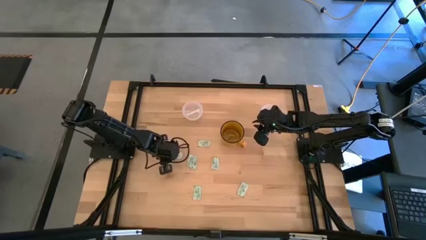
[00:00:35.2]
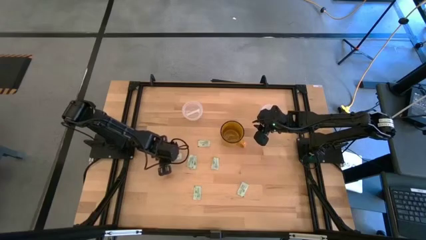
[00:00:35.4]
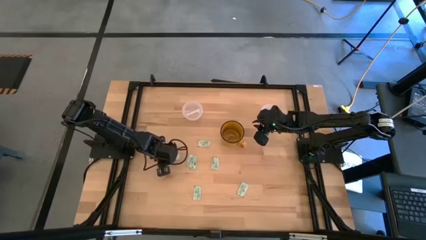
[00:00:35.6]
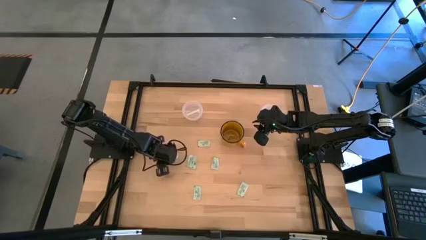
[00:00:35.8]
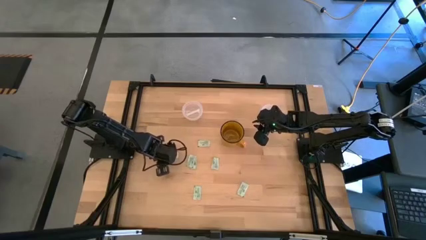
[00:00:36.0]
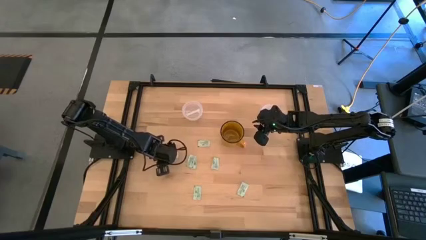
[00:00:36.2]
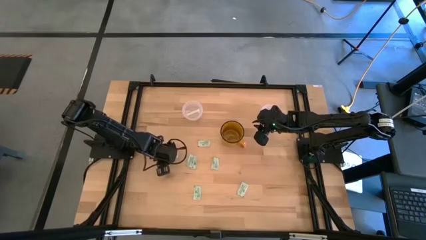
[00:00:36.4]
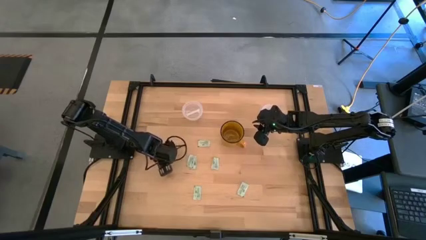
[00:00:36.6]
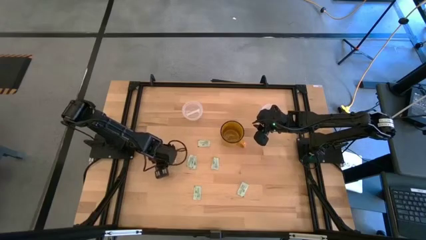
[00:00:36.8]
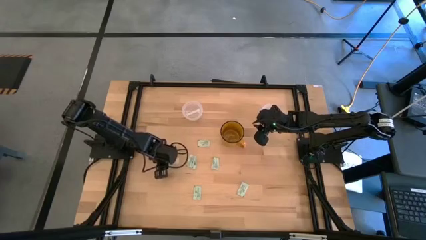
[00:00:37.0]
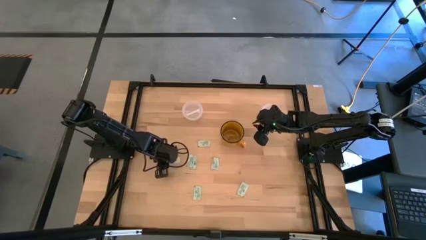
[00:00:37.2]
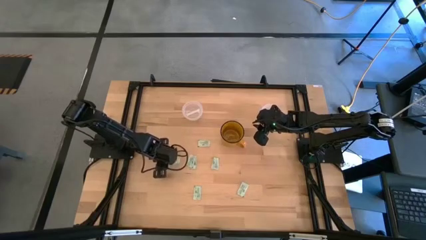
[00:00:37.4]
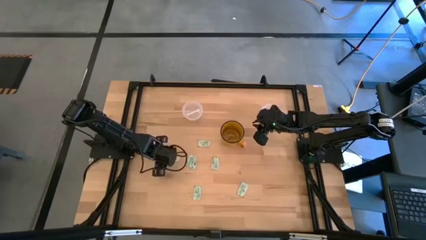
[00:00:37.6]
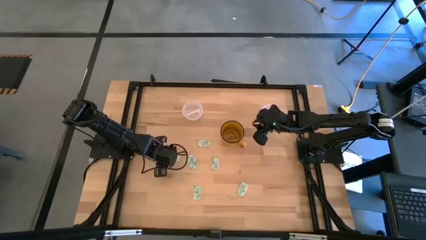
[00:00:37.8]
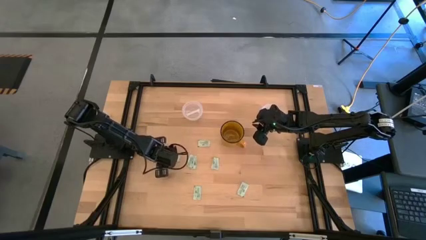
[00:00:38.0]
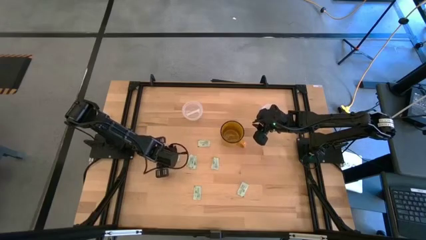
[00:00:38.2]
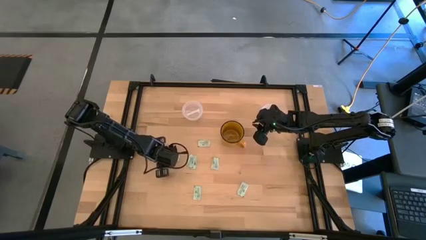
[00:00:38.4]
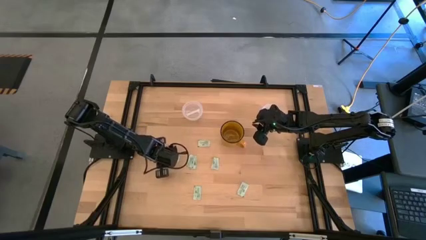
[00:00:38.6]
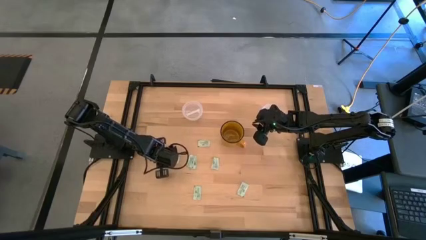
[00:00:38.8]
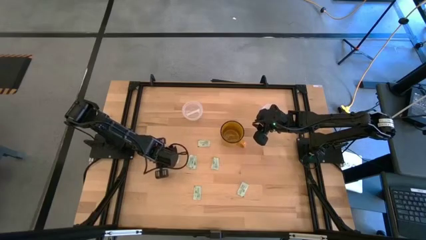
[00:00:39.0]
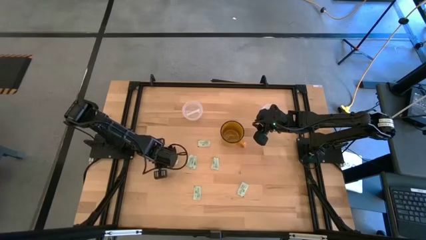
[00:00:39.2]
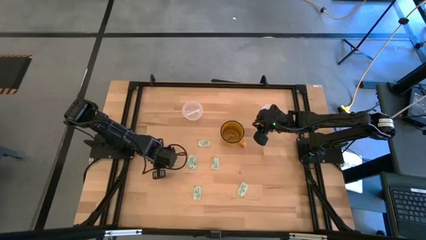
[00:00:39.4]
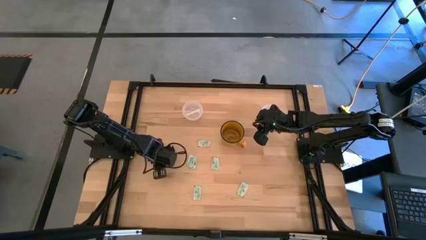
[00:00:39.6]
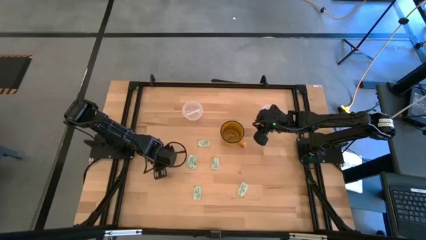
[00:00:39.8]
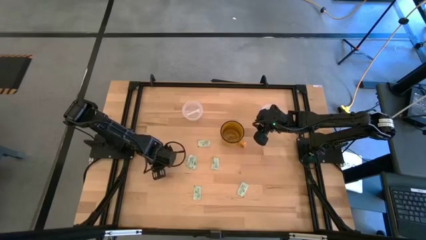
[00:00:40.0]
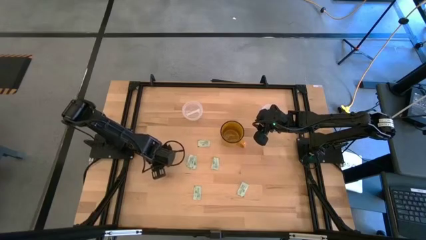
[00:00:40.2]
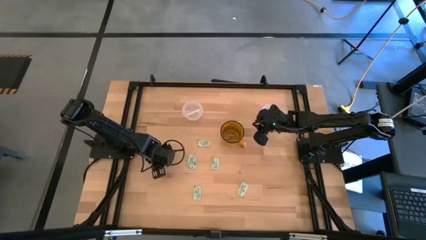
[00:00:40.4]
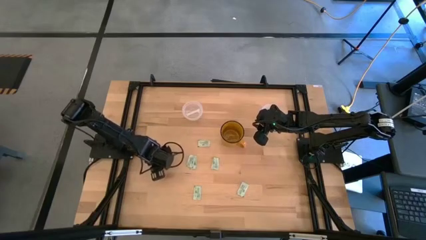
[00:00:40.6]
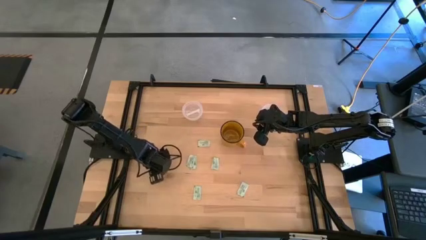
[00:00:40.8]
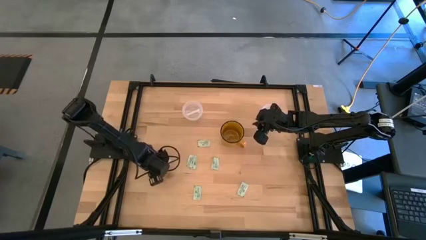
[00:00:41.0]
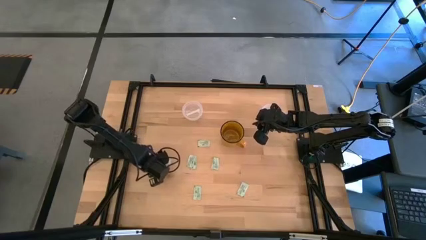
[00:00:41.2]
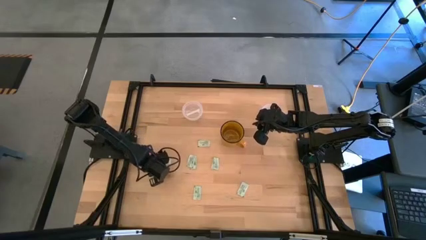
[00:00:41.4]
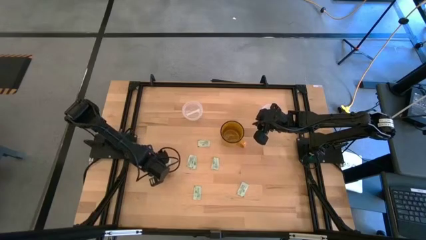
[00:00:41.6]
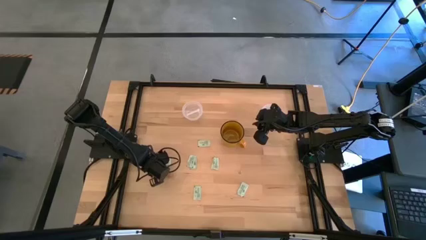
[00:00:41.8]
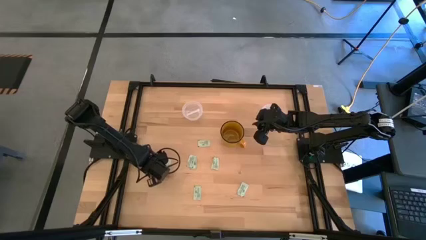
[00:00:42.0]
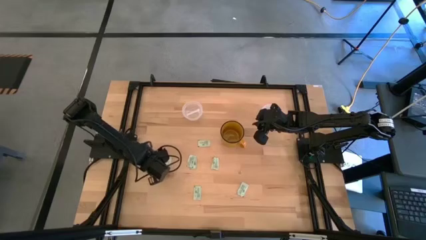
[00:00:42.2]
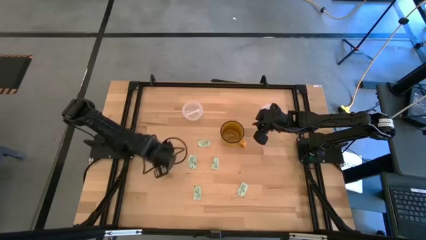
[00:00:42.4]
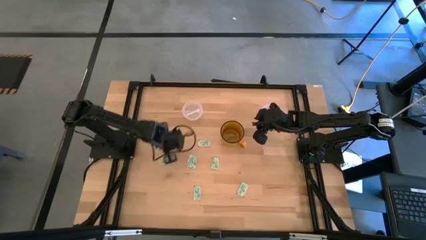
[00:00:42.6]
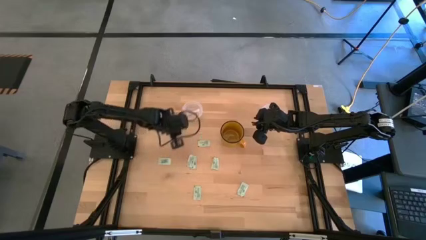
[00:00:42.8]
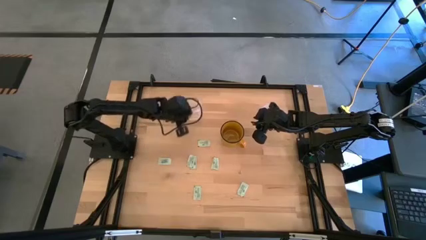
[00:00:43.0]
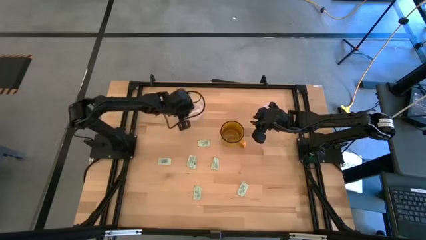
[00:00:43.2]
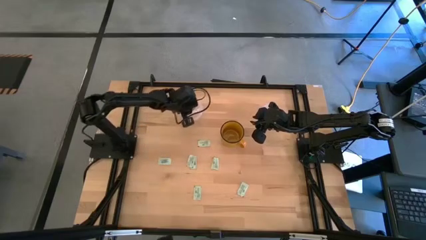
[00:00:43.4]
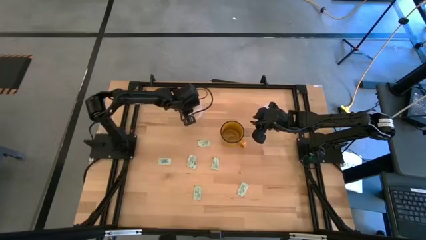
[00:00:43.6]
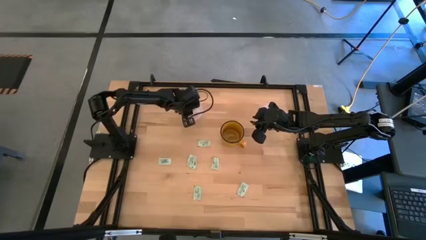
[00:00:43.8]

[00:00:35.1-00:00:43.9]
Task: Pick and place Stevia / Truvia into bins
Put the white stevia packet into the left transparent container

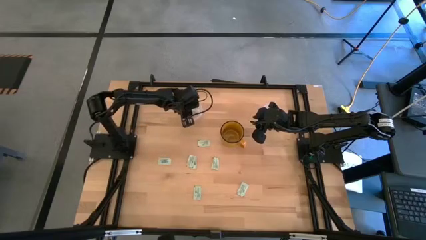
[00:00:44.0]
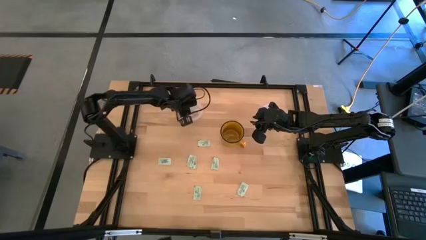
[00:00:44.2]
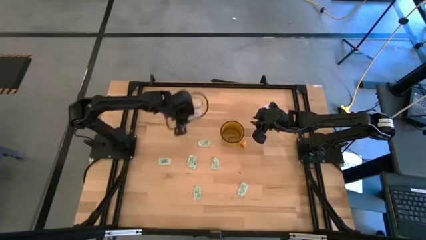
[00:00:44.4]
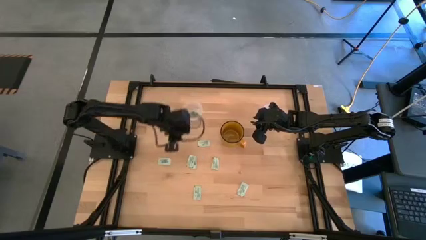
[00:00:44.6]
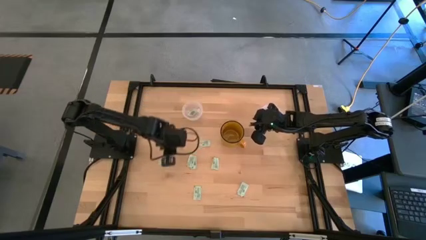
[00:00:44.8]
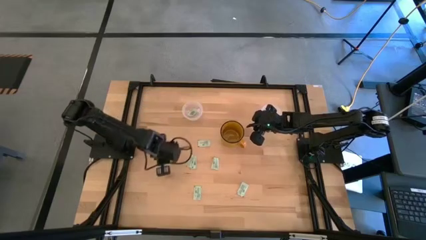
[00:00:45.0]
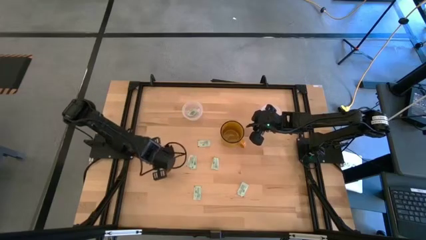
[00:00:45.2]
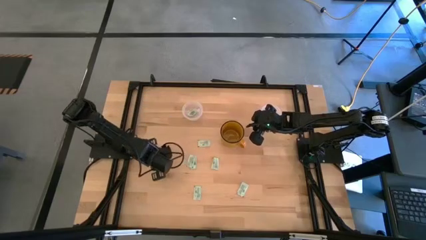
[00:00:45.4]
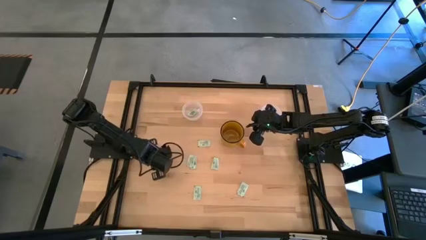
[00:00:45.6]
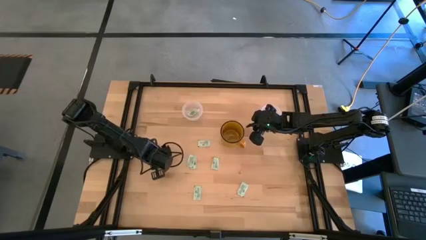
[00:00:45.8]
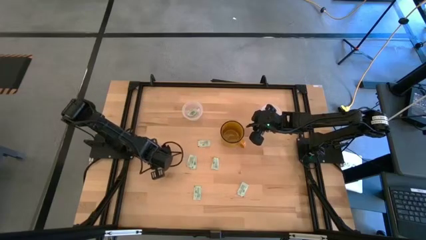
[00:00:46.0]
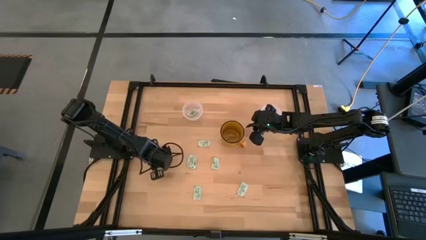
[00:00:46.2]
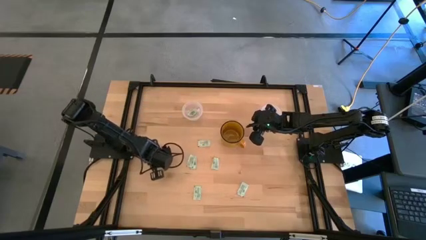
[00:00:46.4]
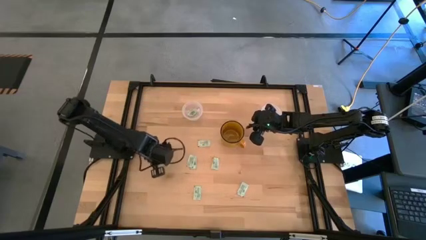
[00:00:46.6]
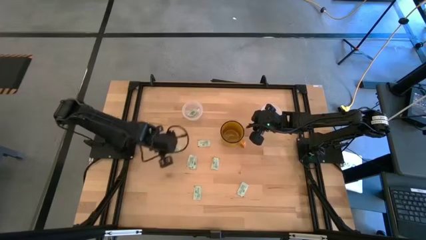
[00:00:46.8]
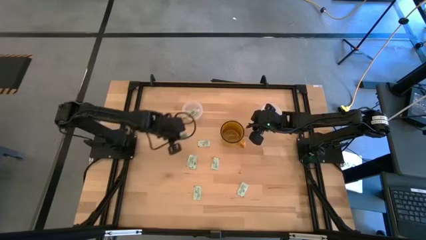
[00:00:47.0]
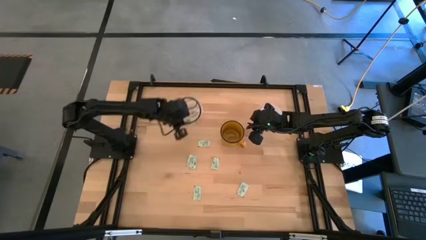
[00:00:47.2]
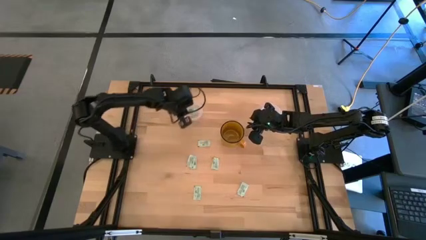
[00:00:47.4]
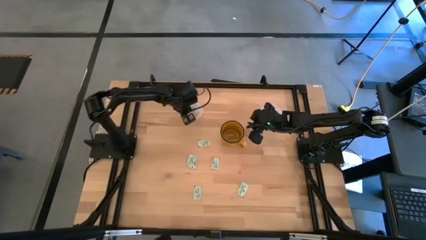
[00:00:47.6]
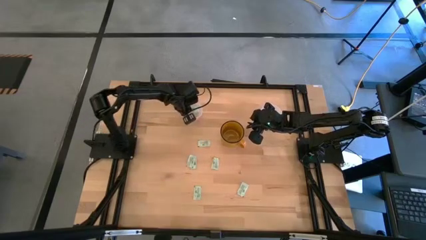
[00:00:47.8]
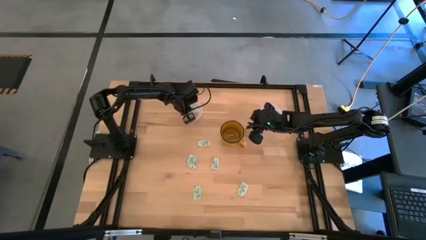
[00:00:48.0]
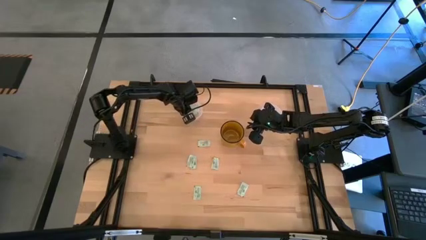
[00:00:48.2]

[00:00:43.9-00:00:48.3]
Put the white stevia packet into the left transparent container

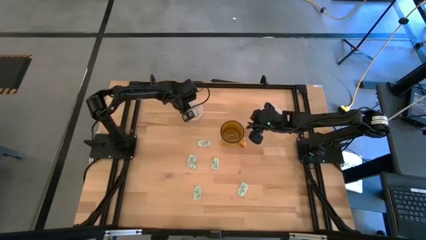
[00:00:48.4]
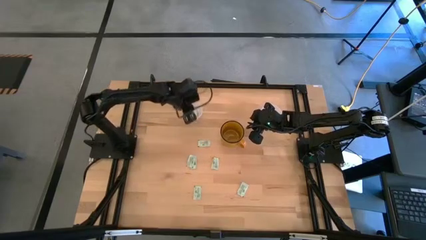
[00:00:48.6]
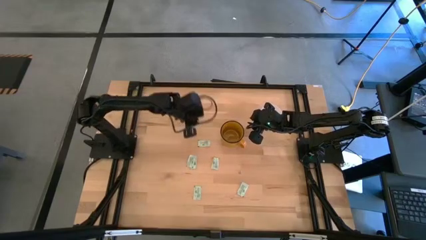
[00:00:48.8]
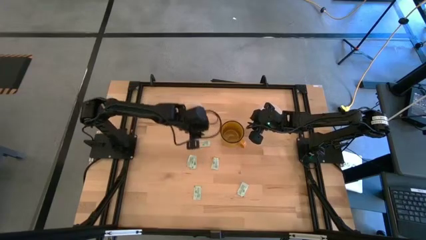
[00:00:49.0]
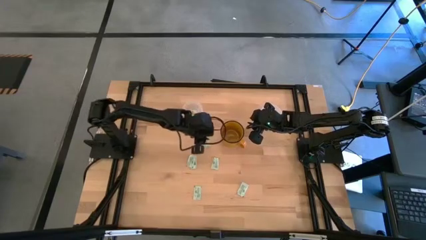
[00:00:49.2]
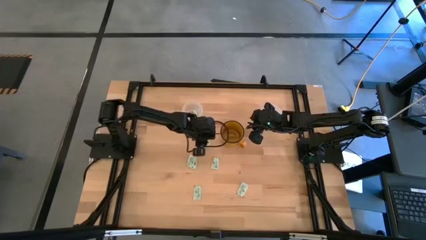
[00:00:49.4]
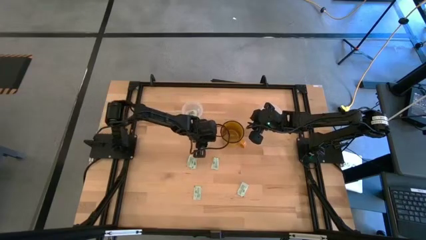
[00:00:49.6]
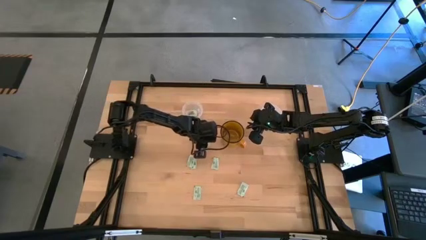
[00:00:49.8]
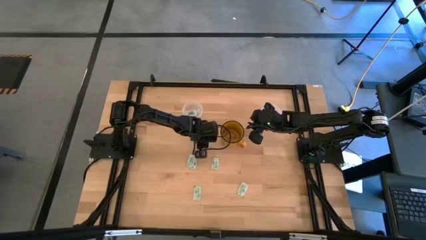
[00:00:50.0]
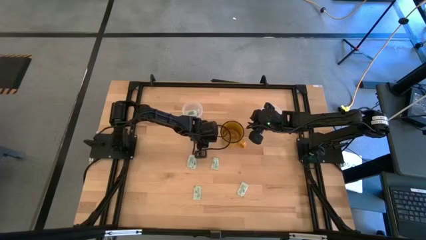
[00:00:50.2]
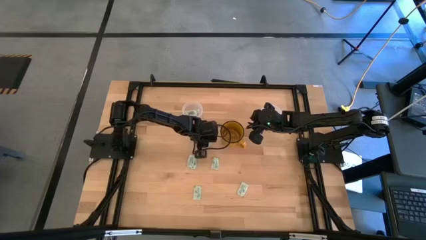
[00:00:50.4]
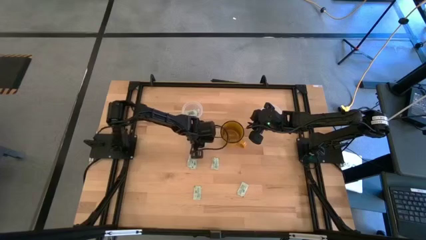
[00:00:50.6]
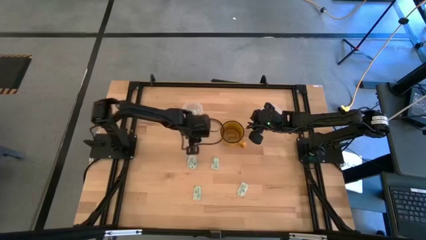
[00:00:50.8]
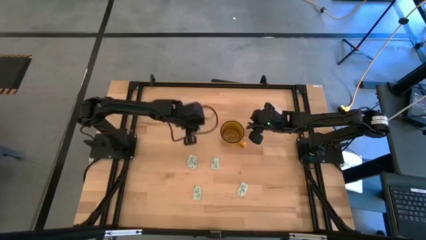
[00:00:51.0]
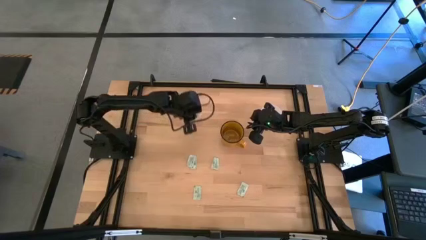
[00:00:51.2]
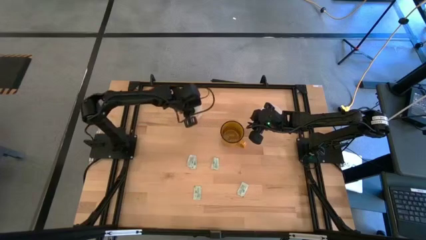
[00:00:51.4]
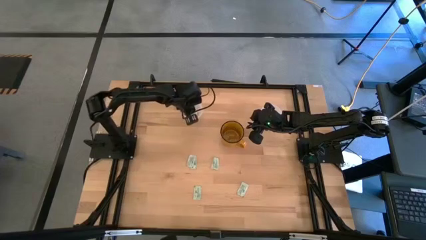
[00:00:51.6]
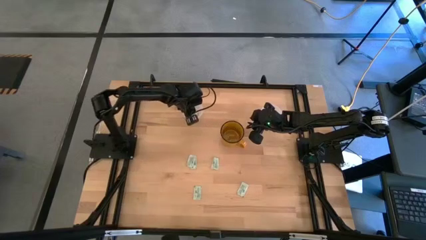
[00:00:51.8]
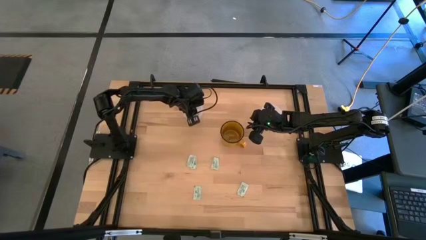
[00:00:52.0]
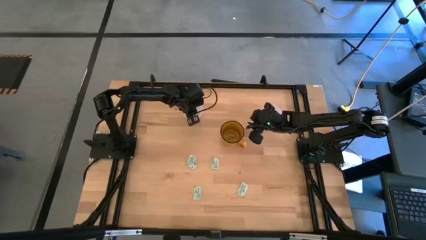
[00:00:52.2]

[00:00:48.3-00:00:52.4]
Put the white stevia packet into the left transparent container
